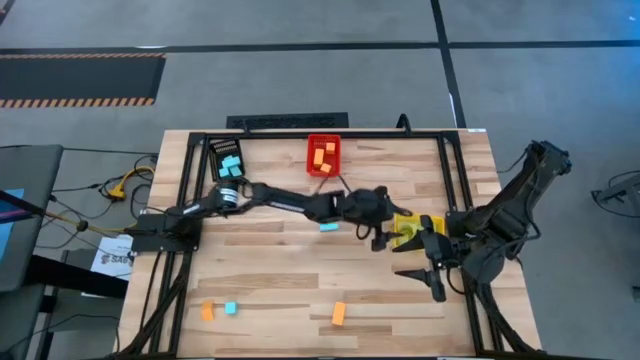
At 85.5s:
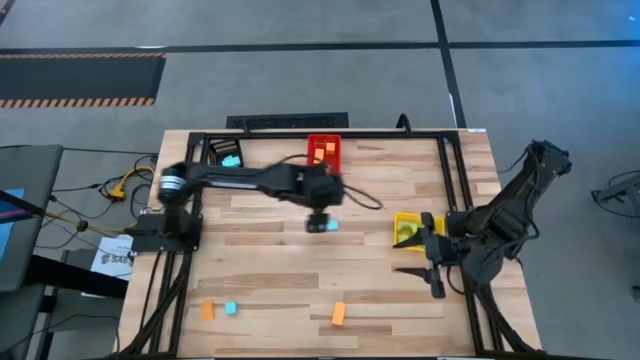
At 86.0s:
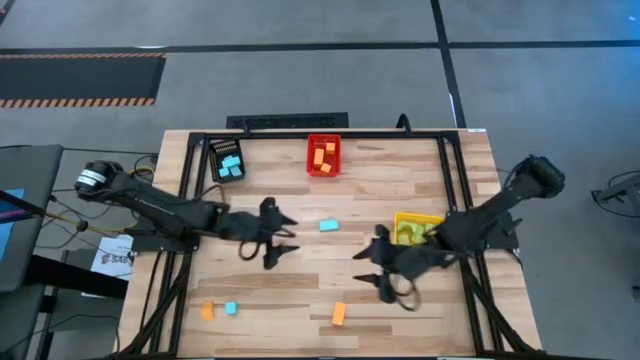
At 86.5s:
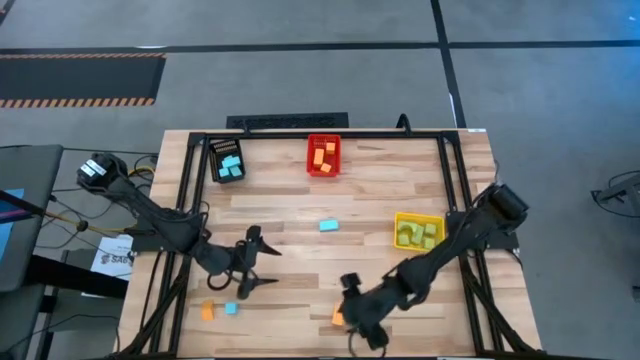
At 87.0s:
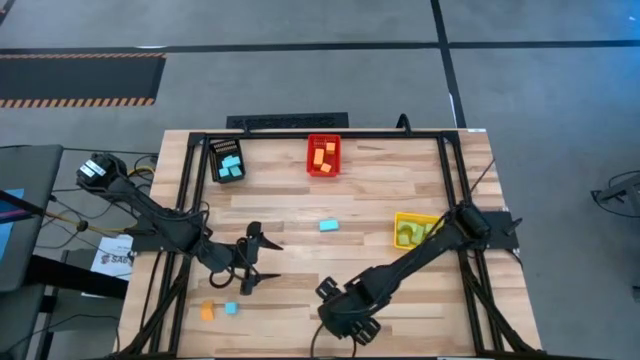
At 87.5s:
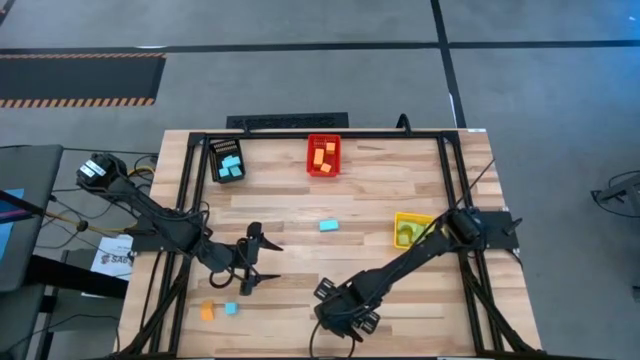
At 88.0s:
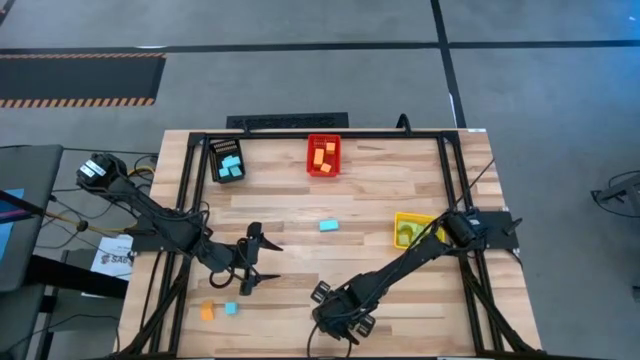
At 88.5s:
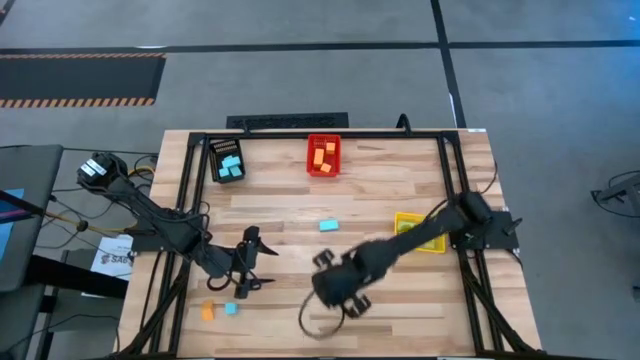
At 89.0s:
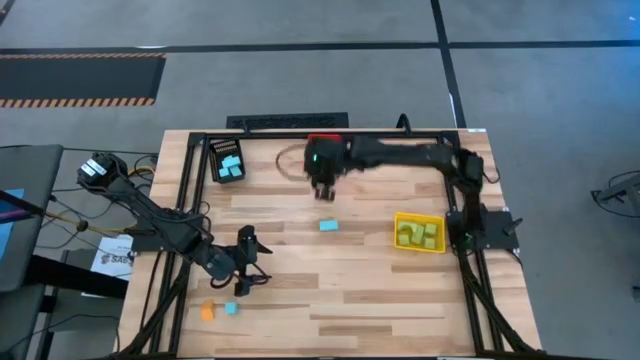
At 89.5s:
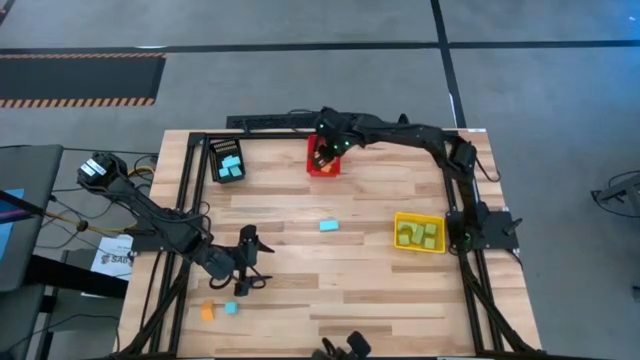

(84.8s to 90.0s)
Task: Sort & place blocks by color
Put the orange block into the red bin

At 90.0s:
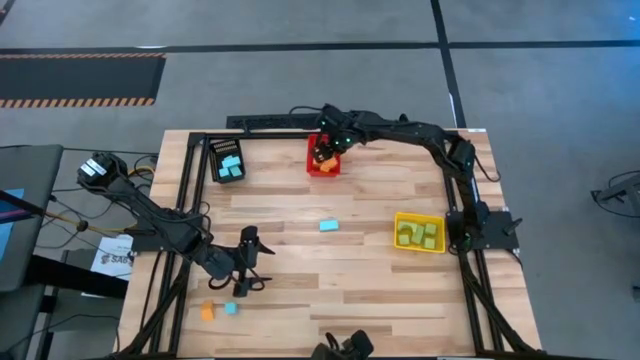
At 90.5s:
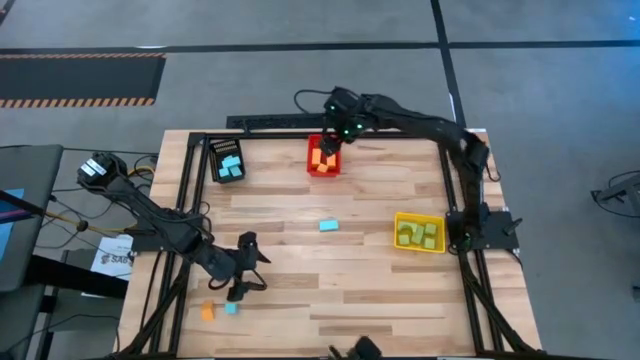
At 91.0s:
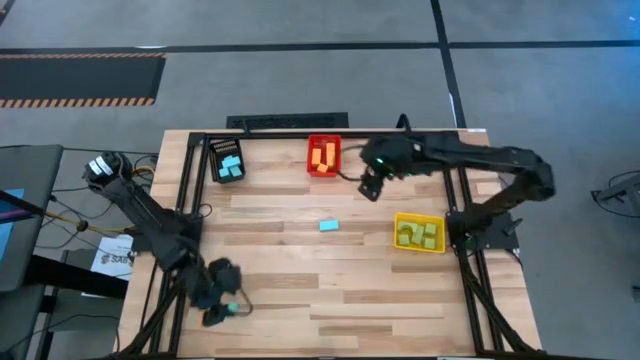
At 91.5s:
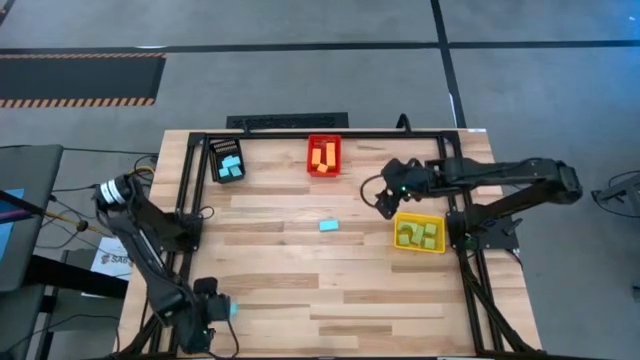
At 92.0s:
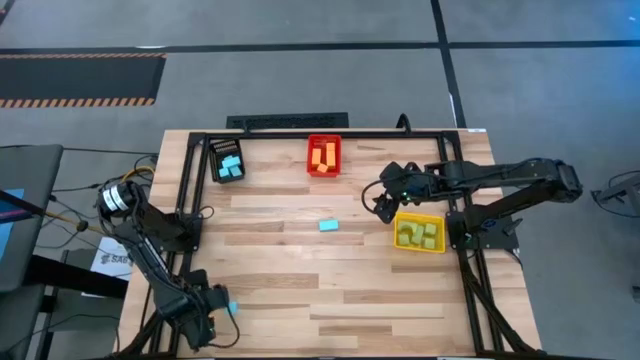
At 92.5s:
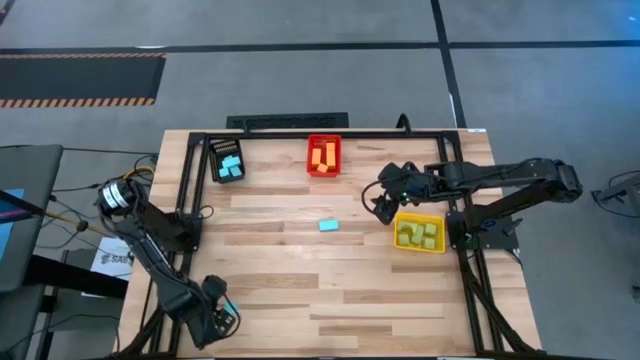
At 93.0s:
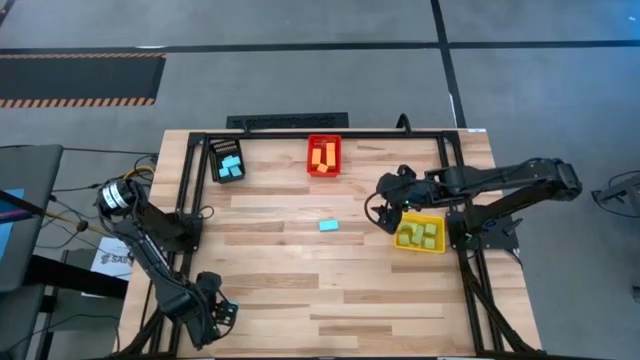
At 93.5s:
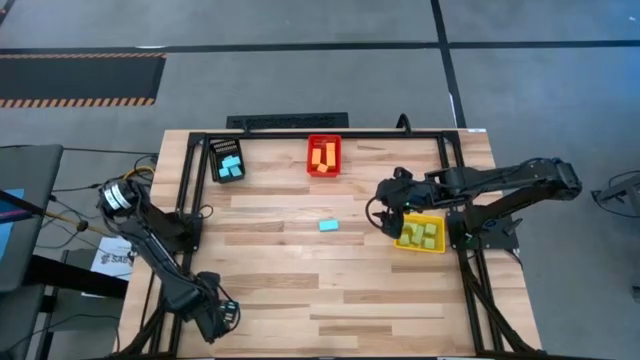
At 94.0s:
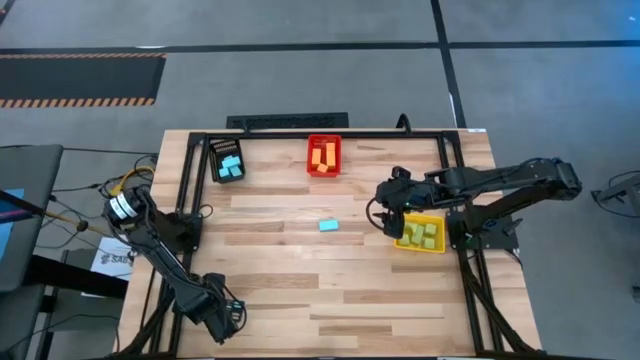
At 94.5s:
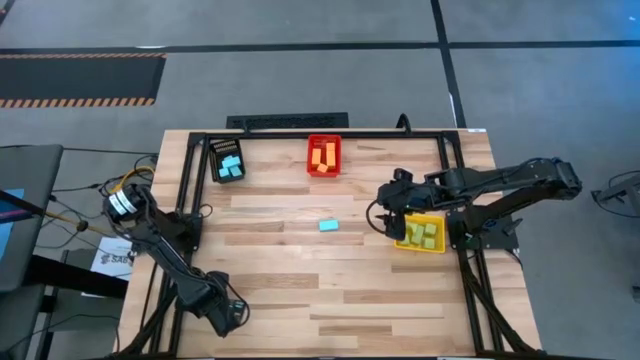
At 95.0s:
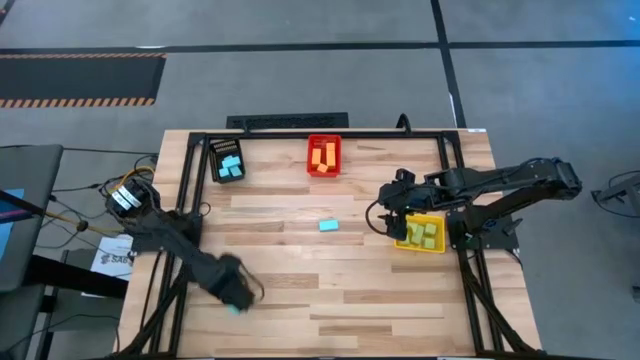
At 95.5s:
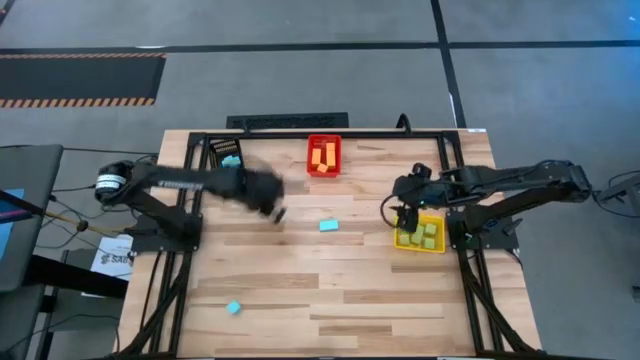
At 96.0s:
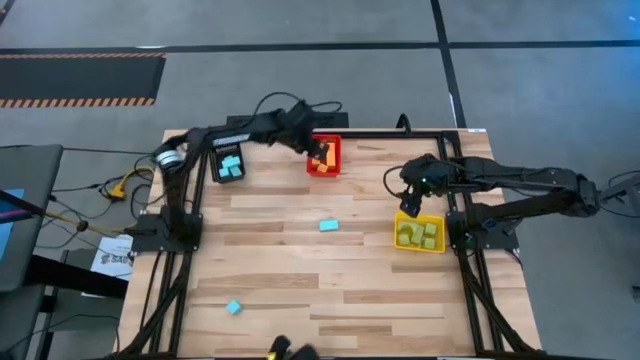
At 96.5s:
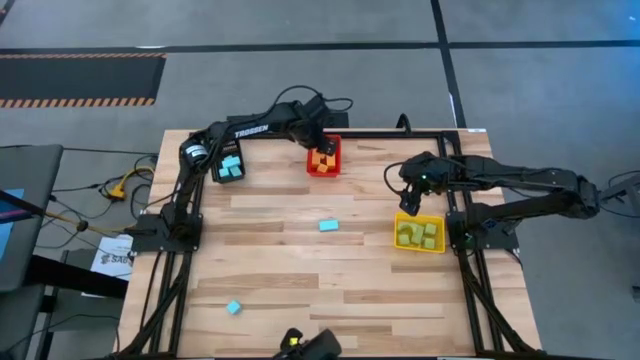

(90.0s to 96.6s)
Put the orange block into the red bin

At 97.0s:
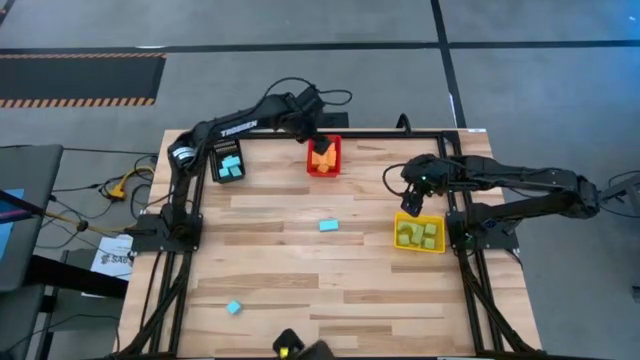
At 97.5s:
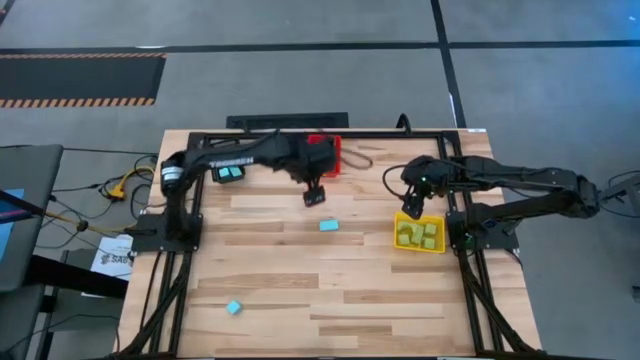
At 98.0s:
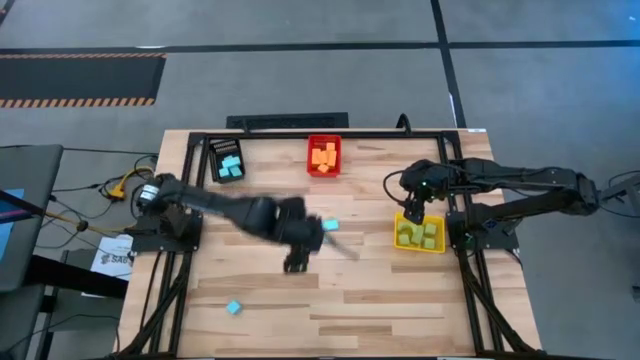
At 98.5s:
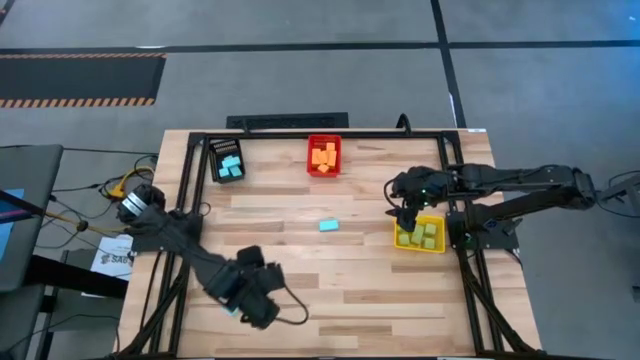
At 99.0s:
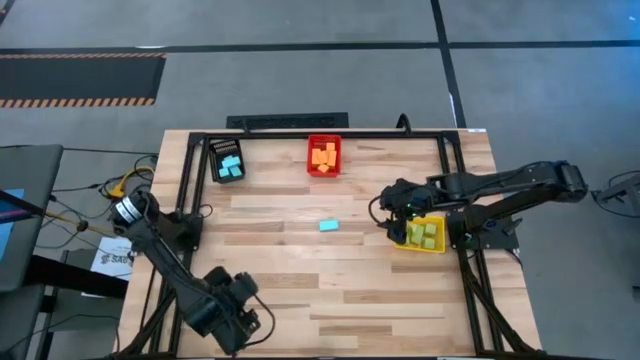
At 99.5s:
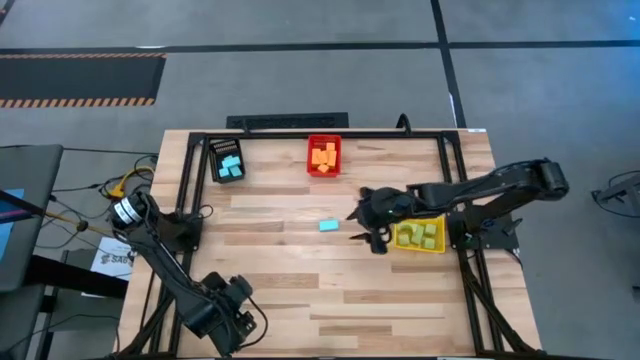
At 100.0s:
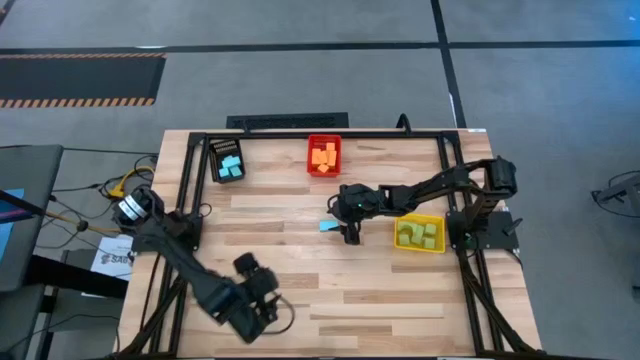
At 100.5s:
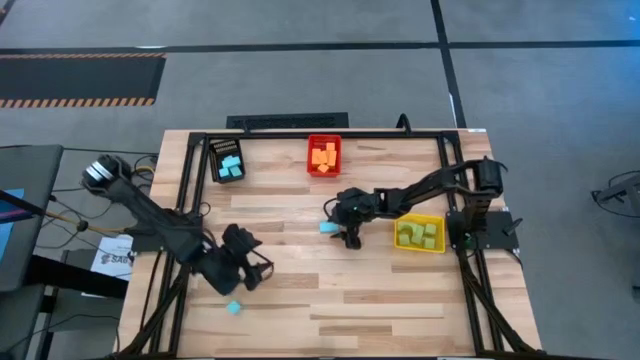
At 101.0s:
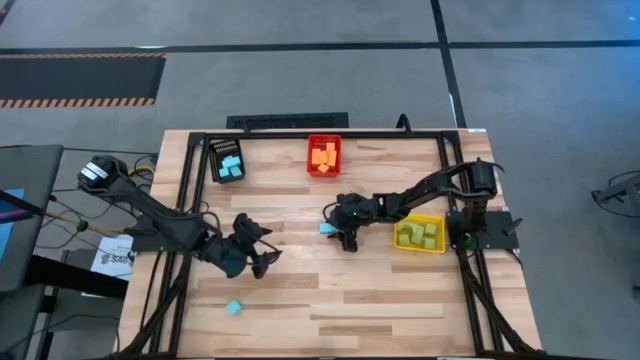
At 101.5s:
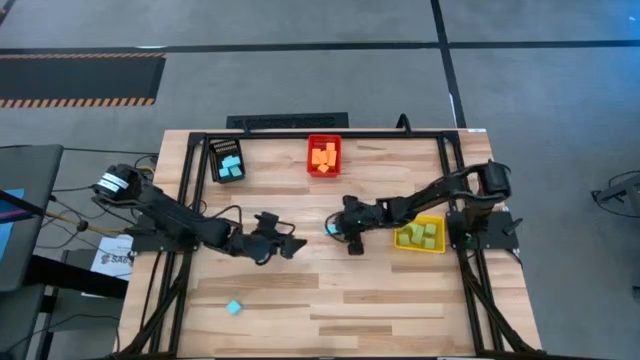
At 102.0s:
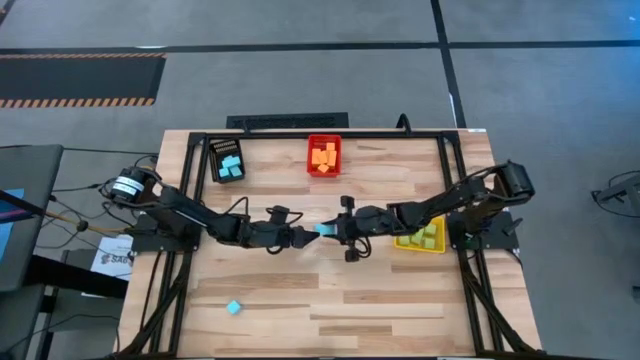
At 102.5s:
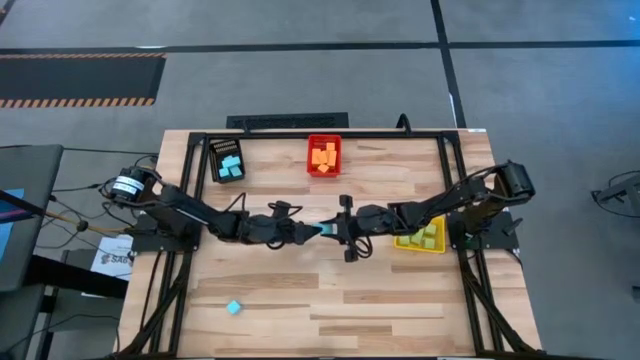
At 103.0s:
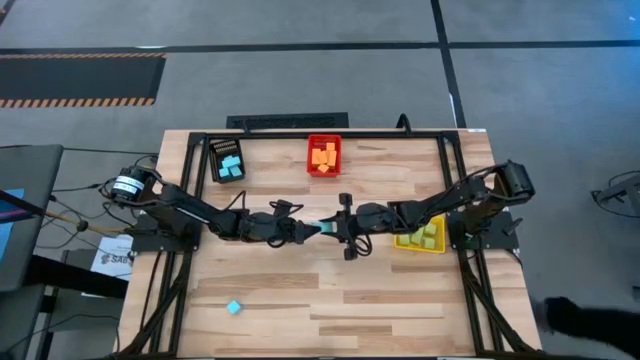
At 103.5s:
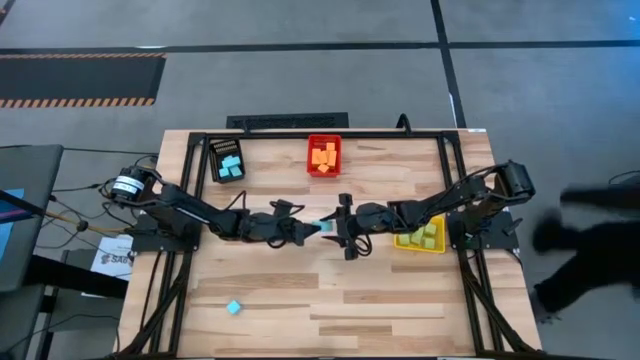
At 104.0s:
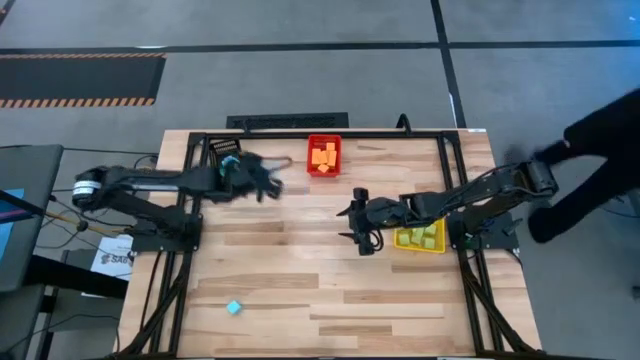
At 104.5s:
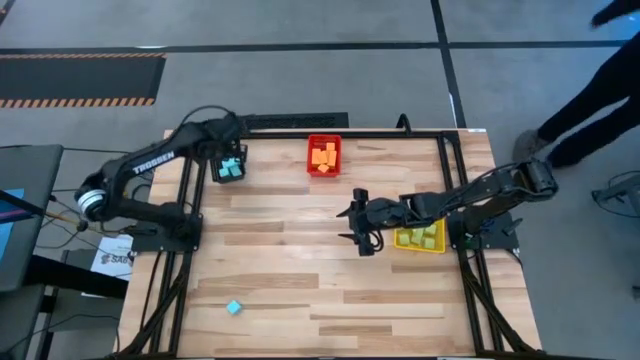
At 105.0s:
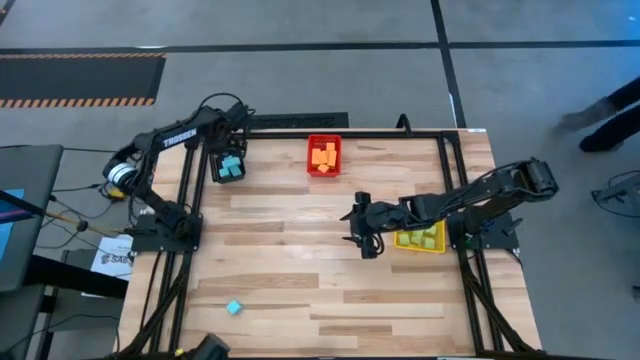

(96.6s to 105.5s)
Put the blue block into the black bin

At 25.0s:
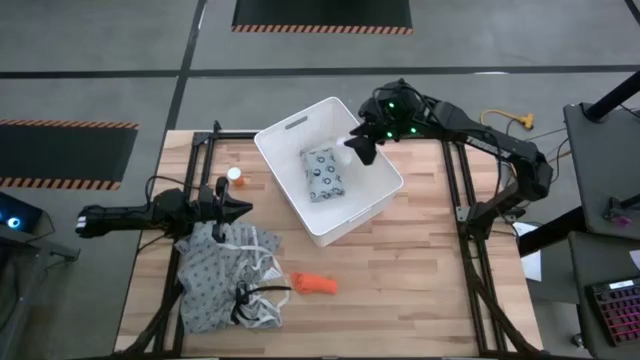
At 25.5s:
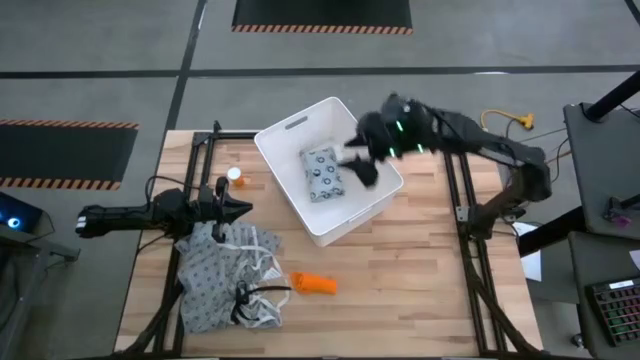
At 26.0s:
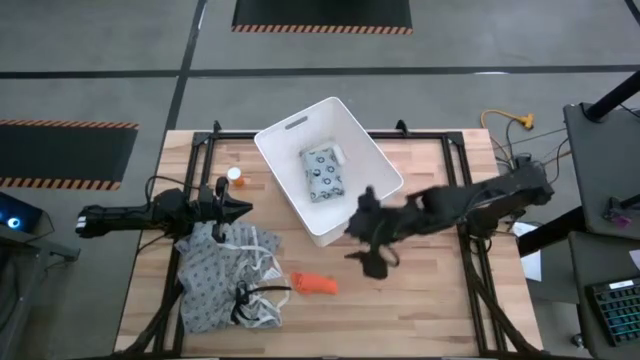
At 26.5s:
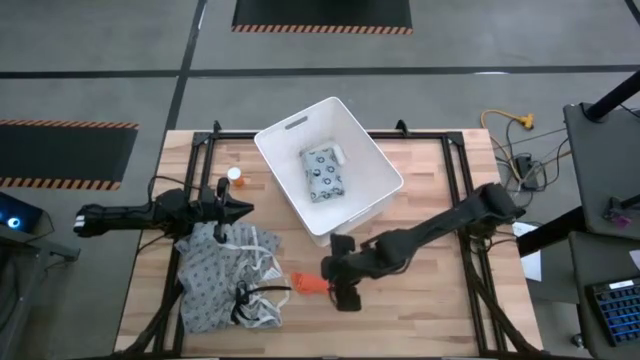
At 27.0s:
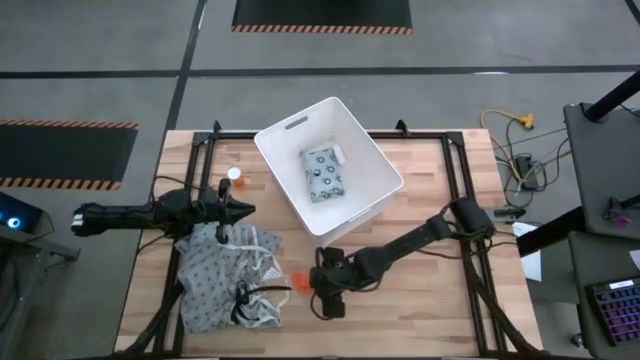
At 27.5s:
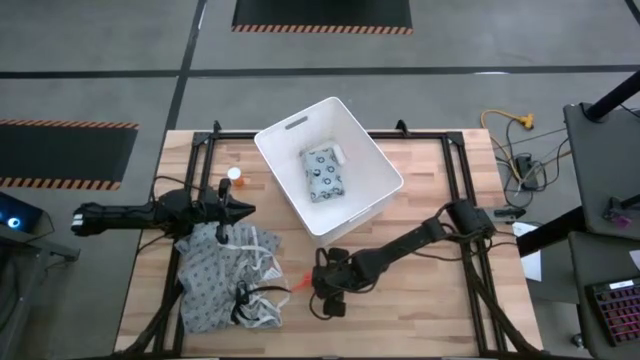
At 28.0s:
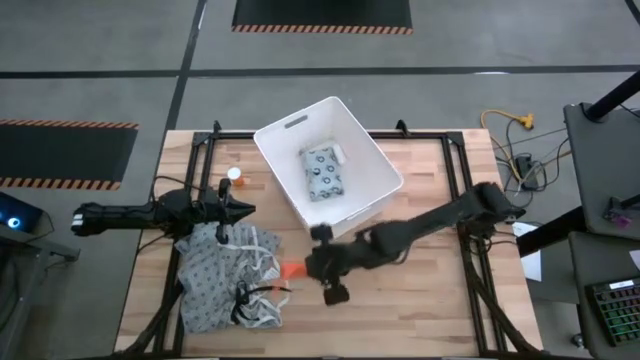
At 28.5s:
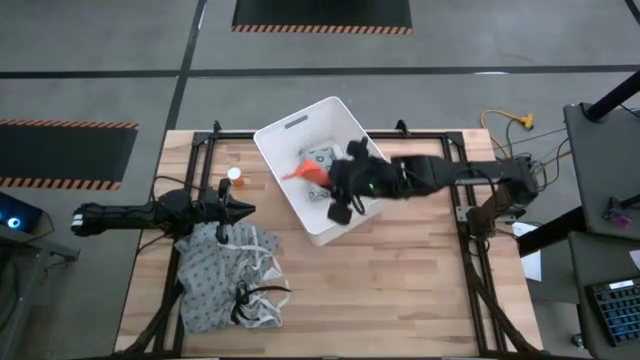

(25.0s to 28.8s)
Task: Pick & place medical supplies in basket/bin
Put the orange bandage into the white bin
